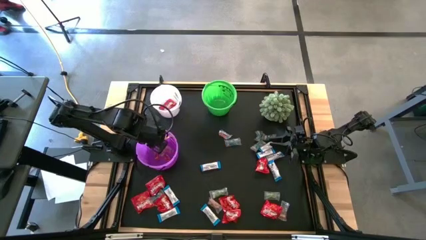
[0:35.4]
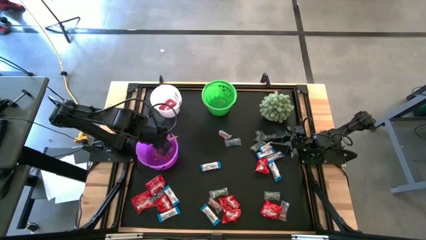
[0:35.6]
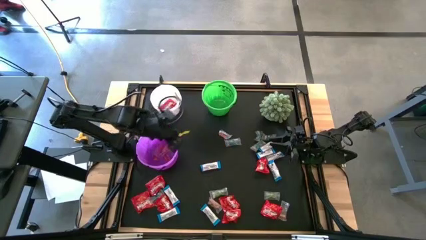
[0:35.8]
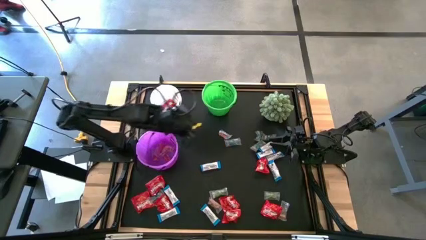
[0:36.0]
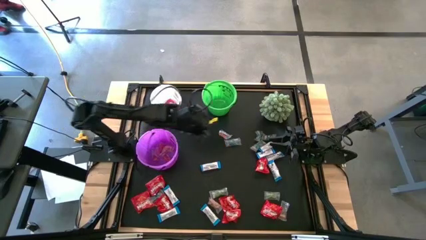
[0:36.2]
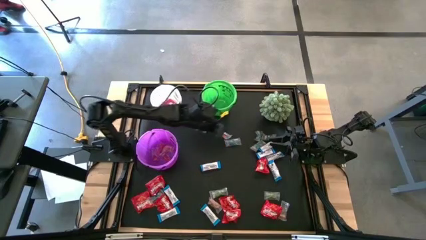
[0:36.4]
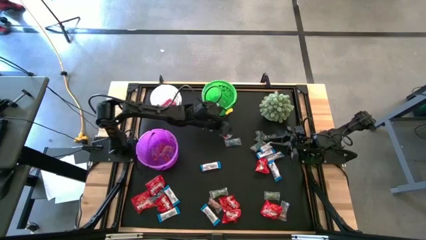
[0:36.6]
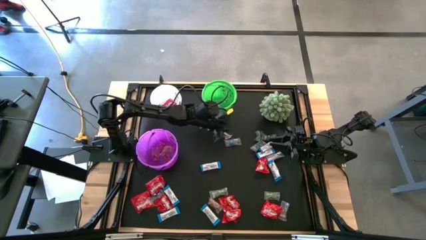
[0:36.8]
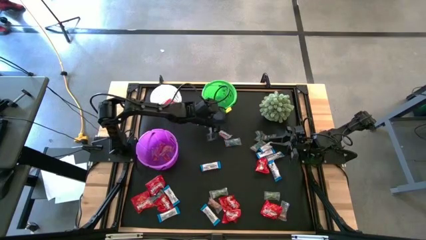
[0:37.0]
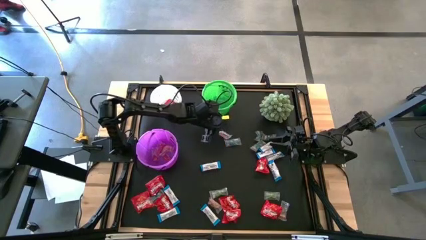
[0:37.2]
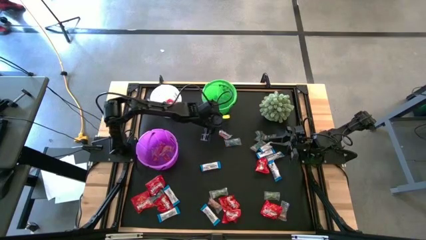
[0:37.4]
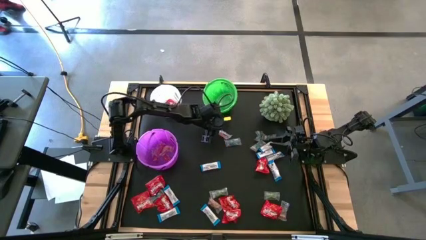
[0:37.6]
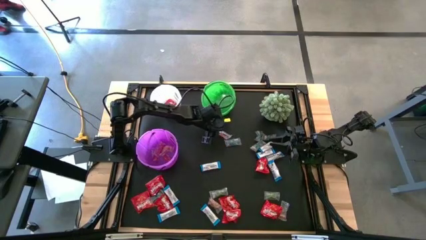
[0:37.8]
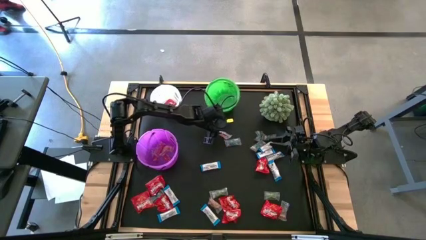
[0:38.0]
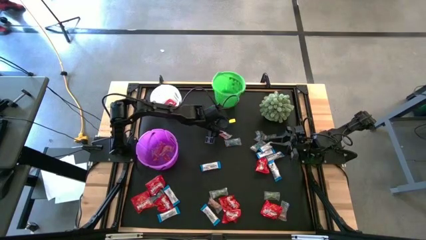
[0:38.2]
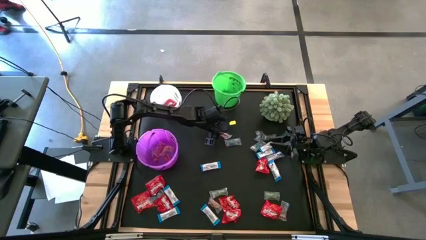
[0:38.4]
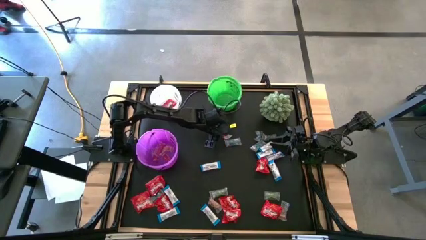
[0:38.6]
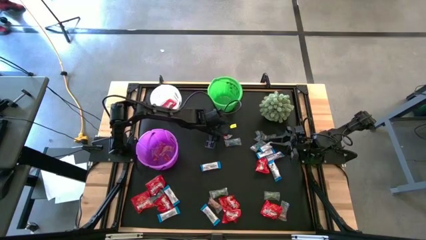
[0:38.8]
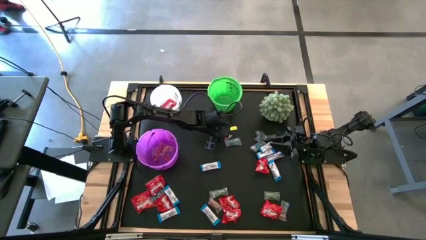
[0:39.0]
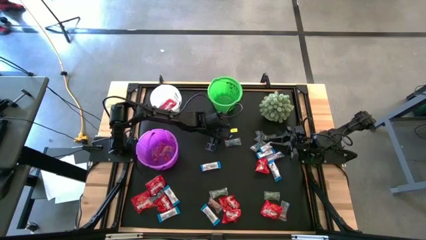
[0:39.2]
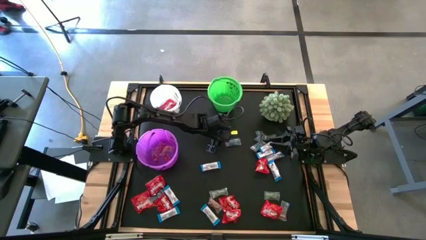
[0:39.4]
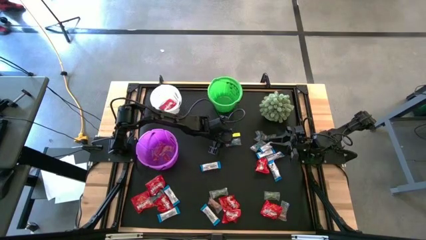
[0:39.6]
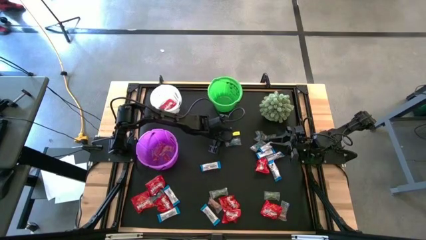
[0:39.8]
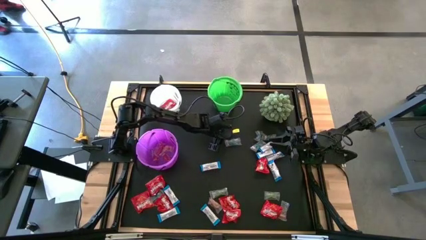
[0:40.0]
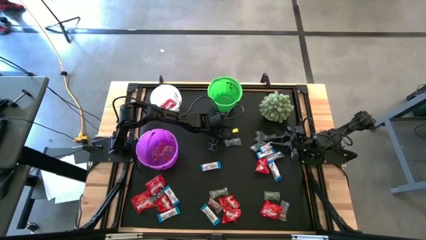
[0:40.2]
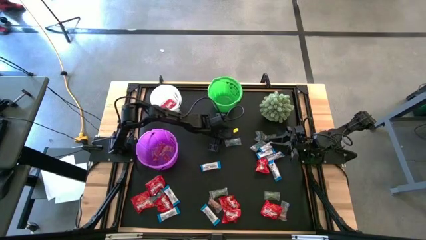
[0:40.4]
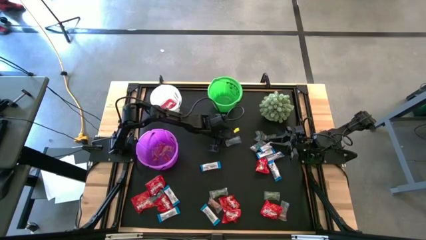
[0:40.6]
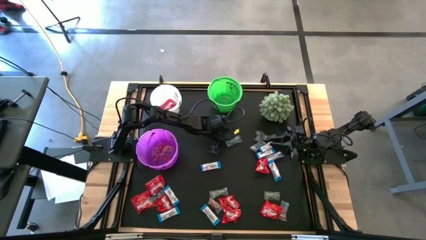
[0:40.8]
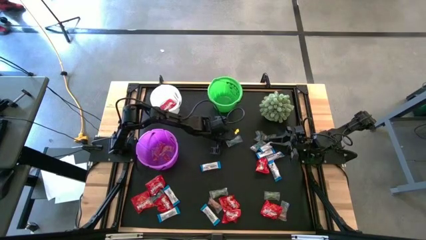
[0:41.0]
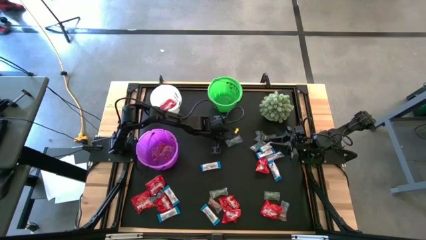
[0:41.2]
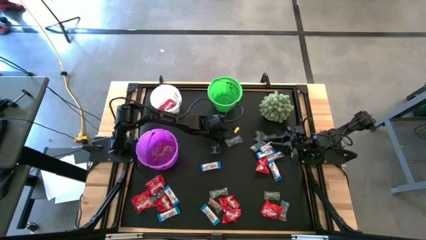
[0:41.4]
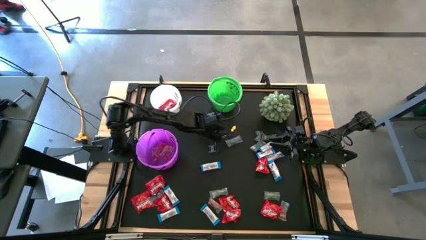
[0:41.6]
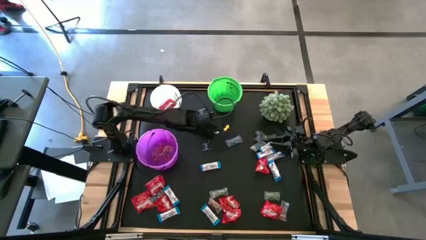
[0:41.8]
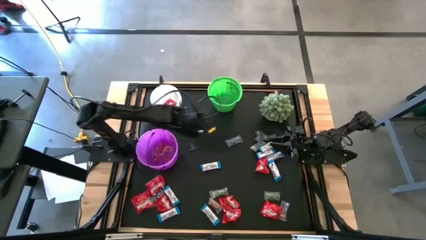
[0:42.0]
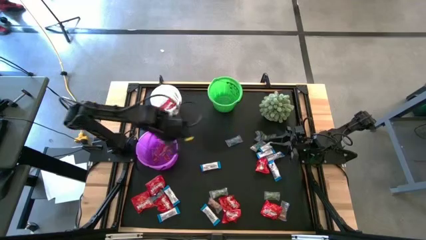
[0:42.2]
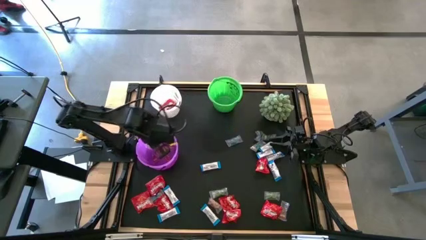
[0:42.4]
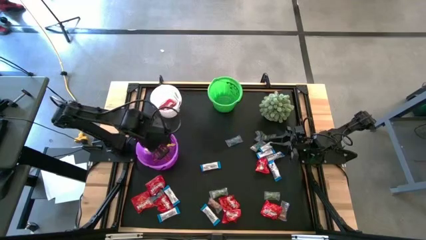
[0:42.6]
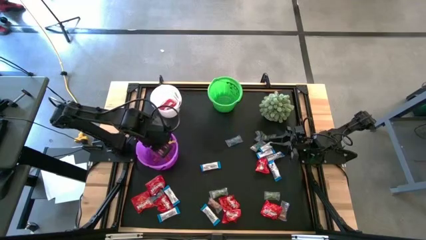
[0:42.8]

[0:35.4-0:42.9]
Task: Sort candy
Put the orange gummy into the violet bucket

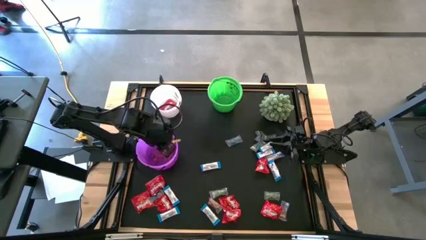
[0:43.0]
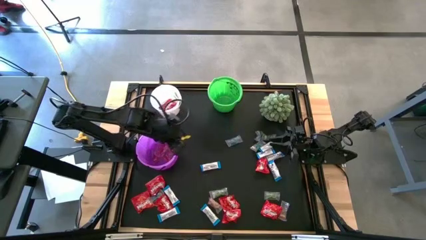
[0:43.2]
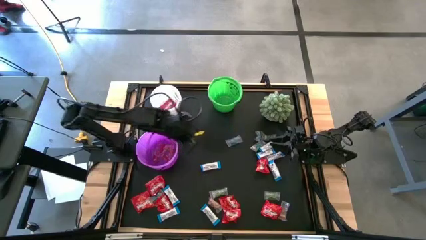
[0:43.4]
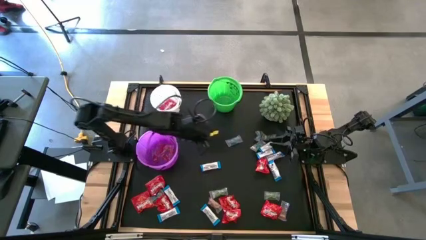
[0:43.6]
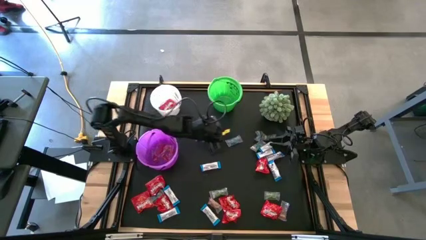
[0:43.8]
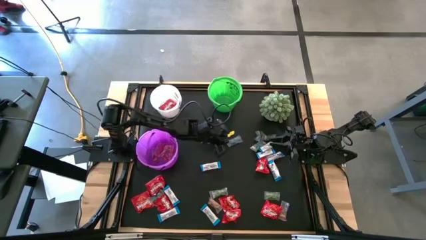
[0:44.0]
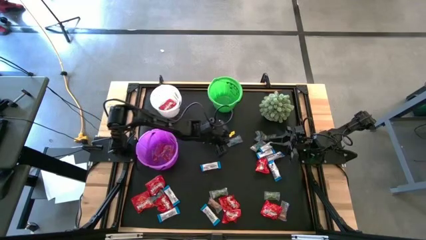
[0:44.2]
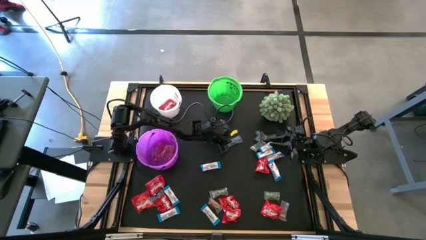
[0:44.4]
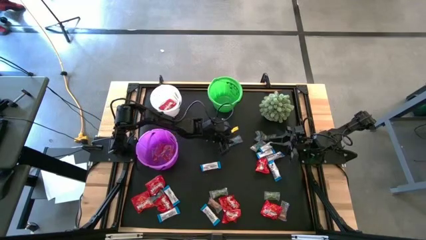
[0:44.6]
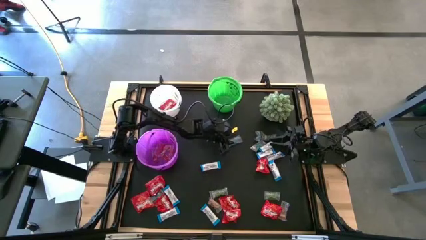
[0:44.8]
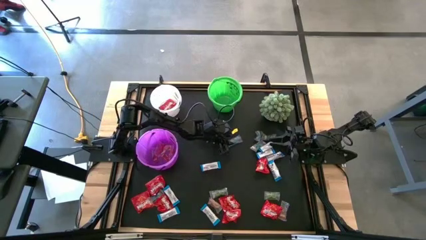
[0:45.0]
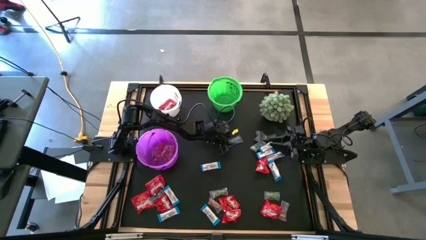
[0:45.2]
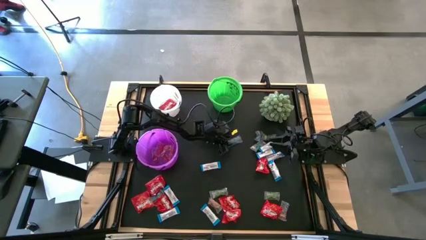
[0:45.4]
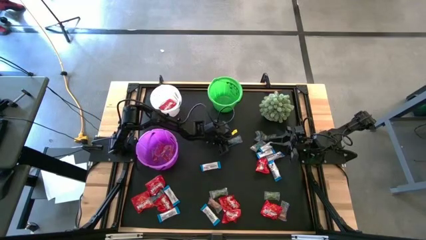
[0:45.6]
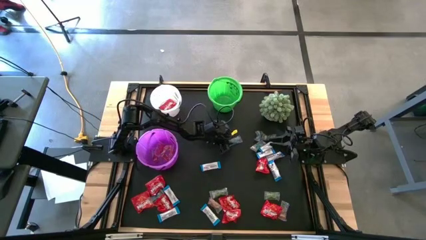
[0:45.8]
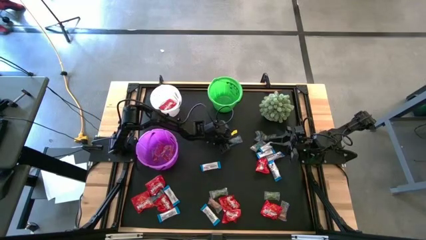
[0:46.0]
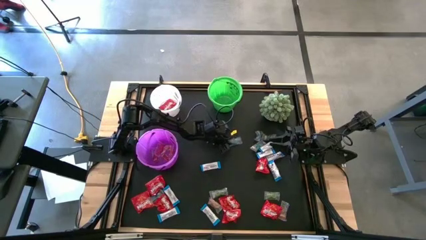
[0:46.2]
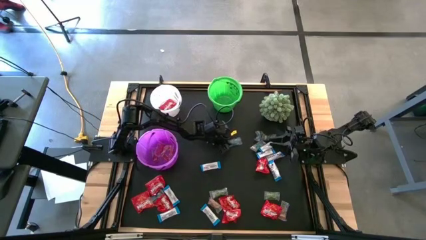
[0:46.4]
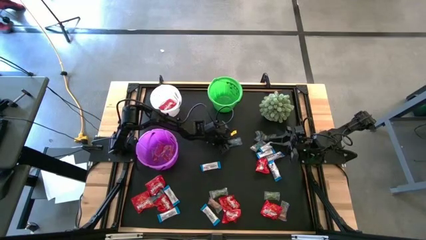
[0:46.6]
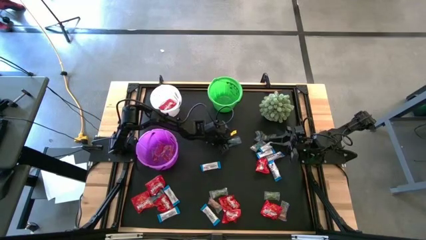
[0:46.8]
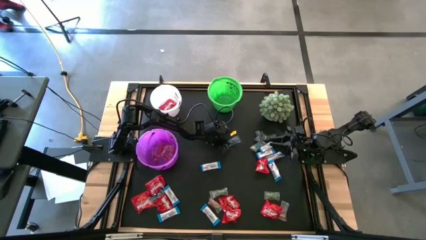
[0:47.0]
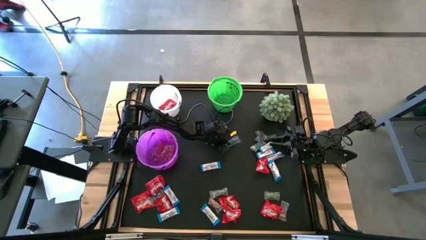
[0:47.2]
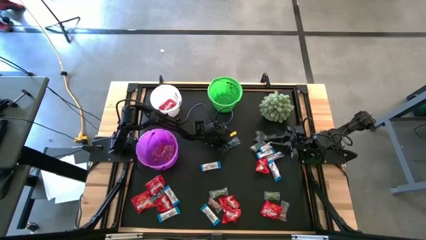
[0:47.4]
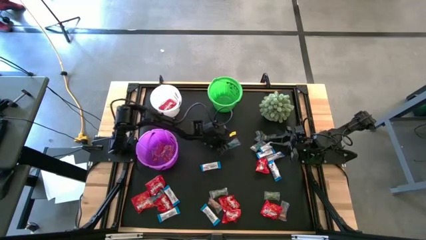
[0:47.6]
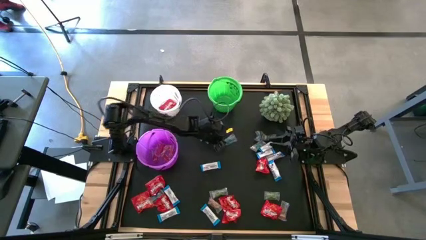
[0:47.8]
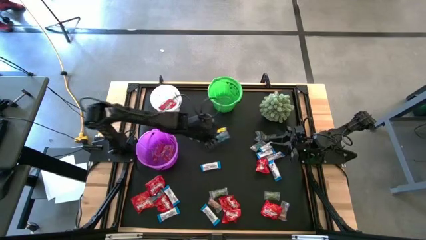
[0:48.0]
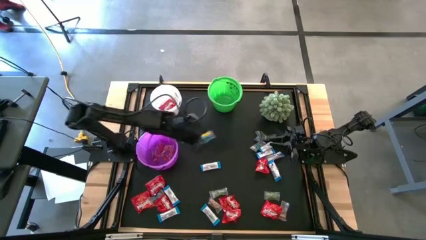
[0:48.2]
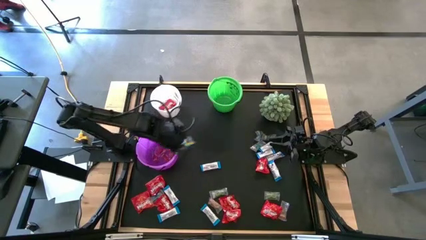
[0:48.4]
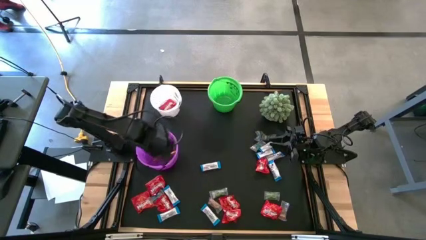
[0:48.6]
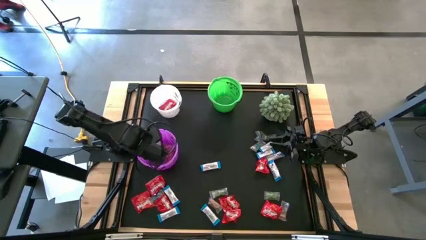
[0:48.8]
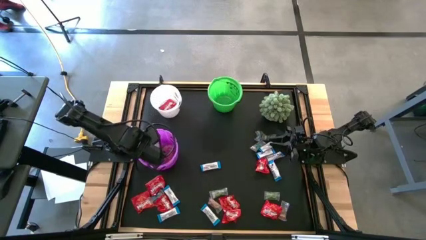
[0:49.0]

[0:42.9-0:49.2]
Put the blue gummy into the violet bucket
